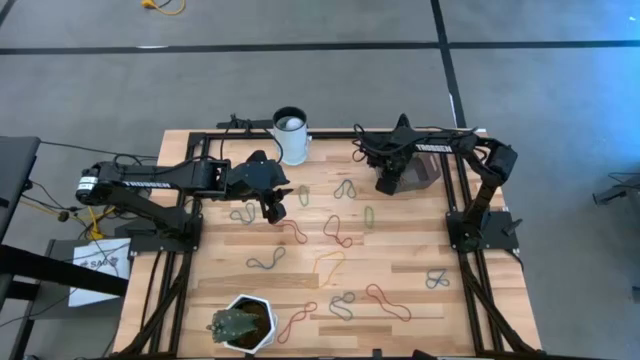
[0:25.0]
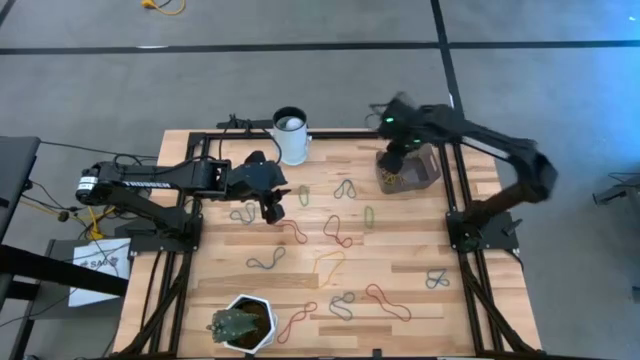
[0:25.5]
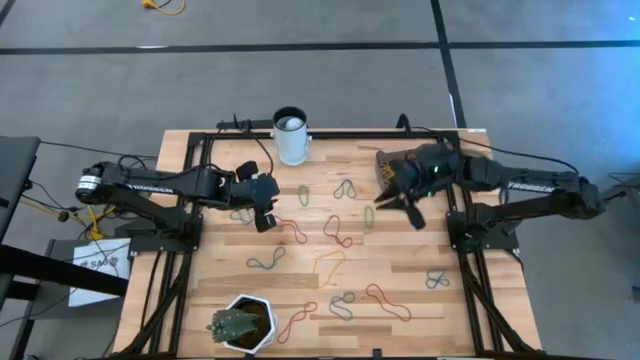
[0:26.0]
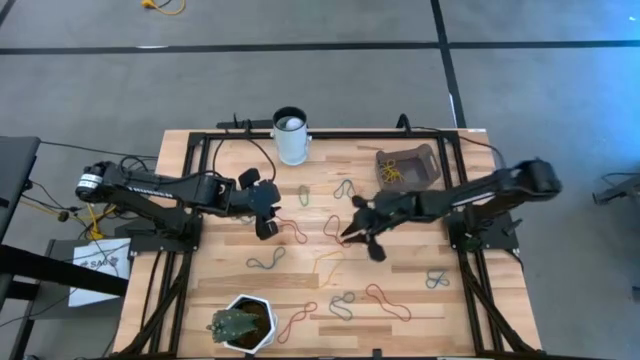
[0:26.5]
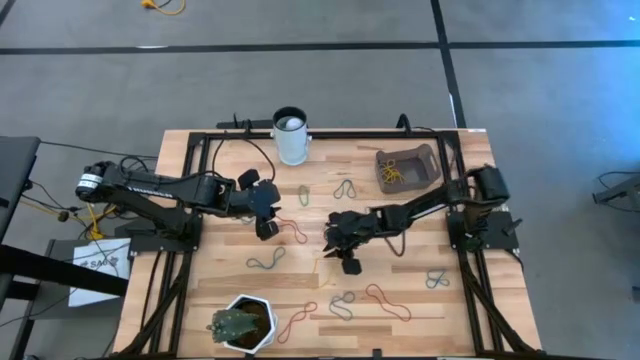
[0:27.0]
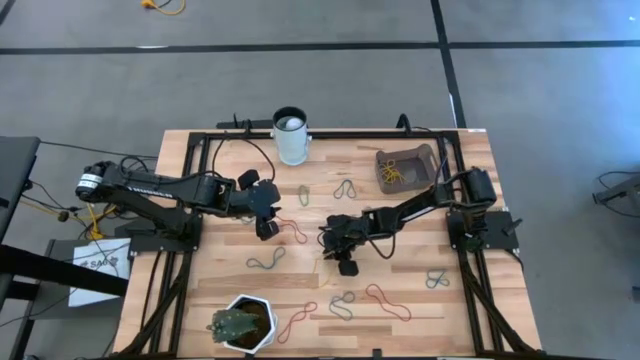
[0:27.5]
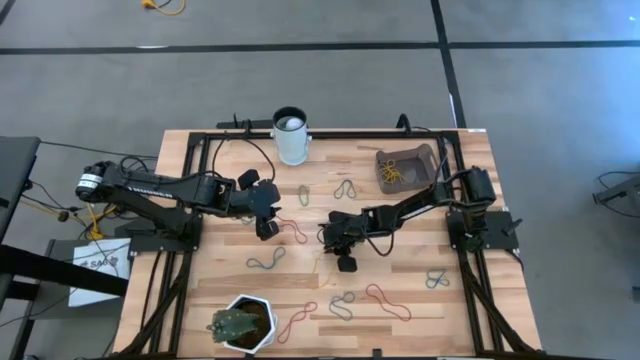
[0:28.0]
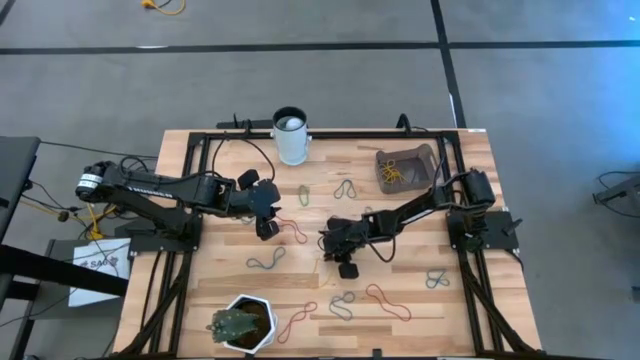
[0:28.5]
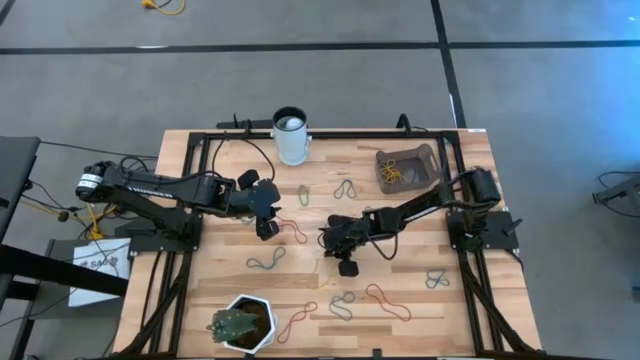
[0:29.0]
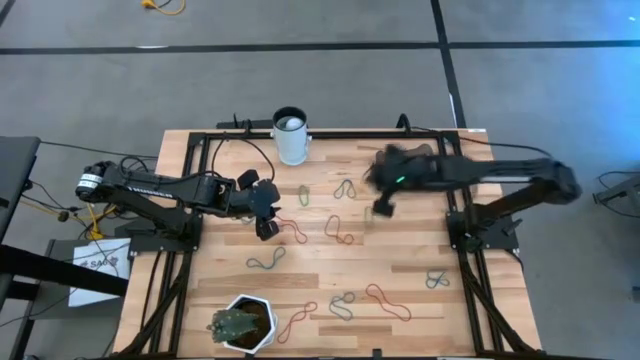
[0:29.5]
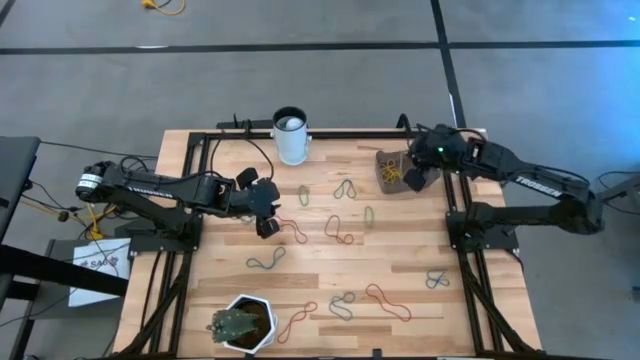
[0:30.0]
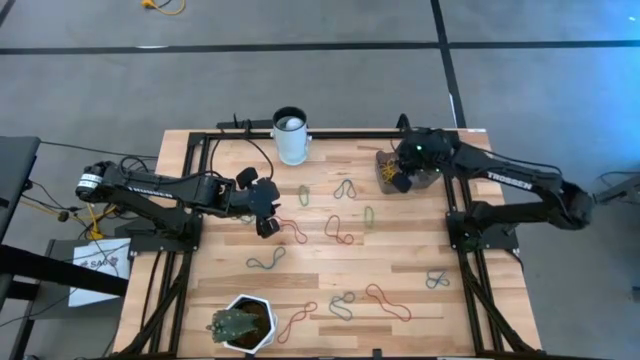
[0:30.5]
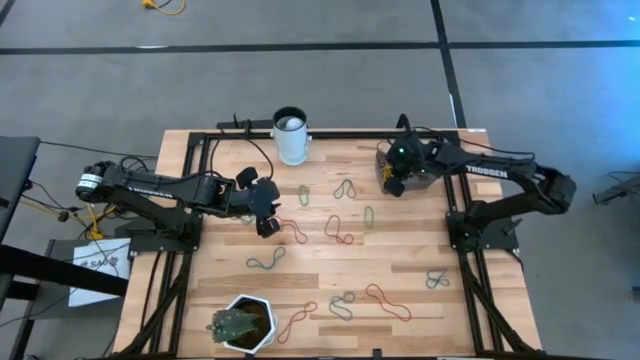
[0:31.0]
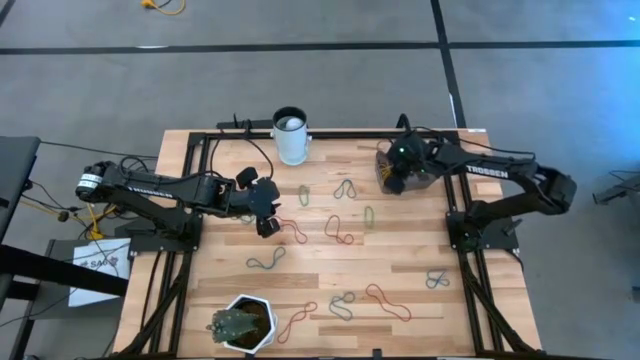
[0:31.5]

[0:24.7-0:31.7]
Task: Pick and place items into bin
Put the yellow rubber band into the bin

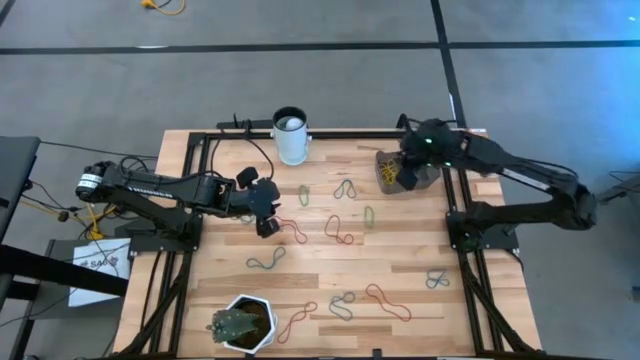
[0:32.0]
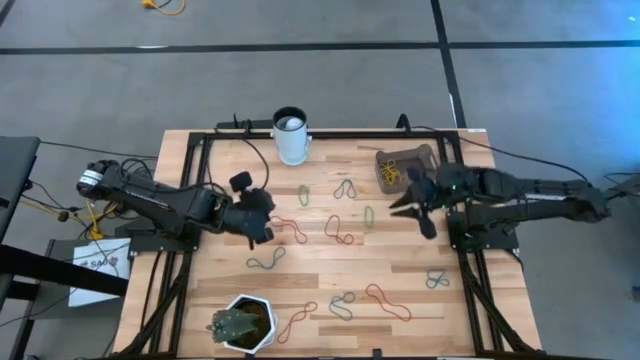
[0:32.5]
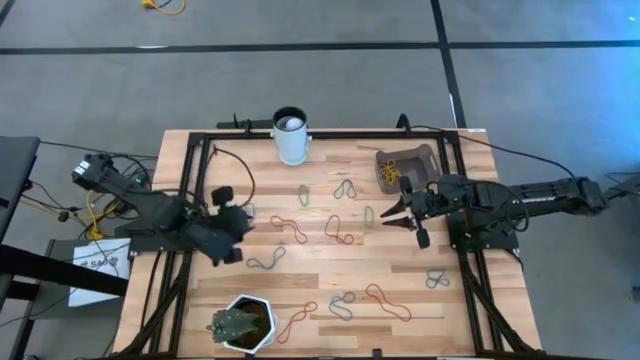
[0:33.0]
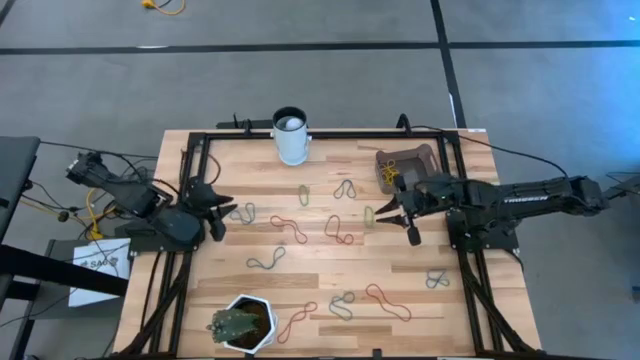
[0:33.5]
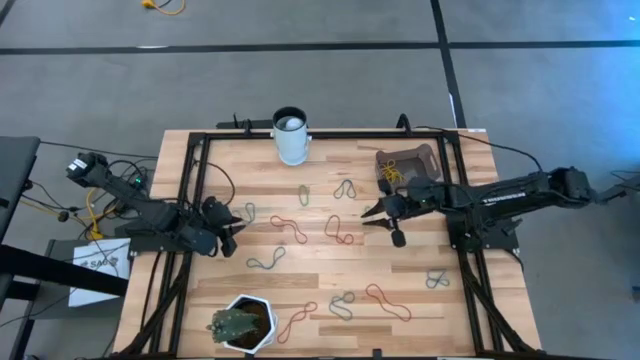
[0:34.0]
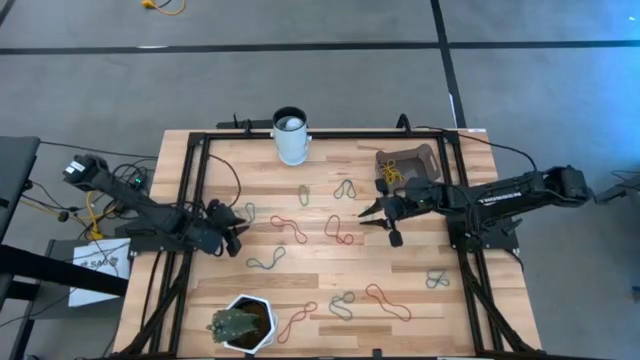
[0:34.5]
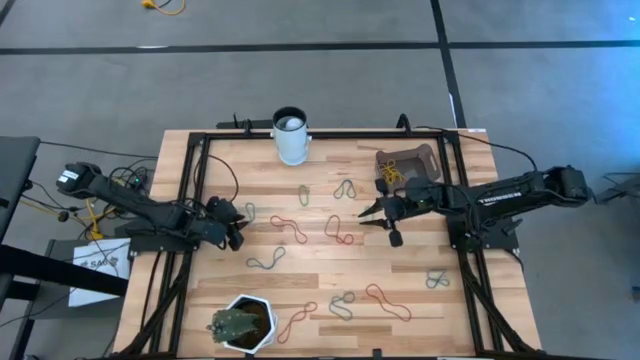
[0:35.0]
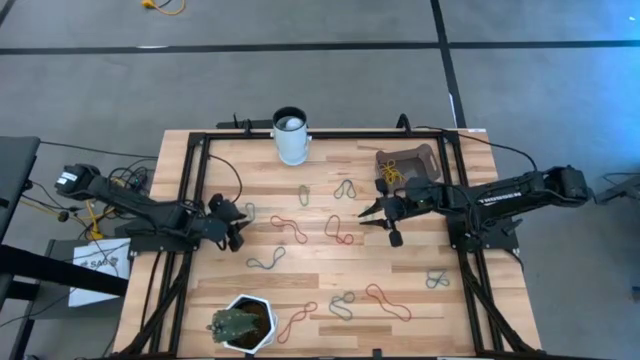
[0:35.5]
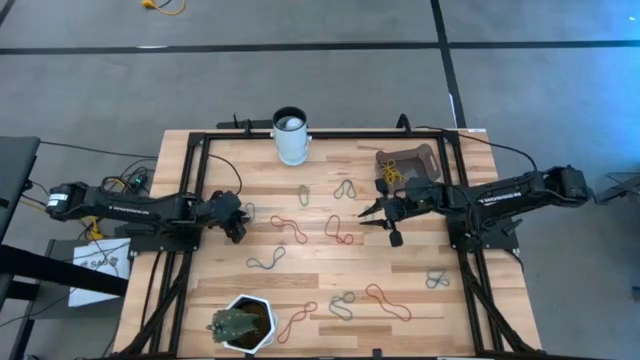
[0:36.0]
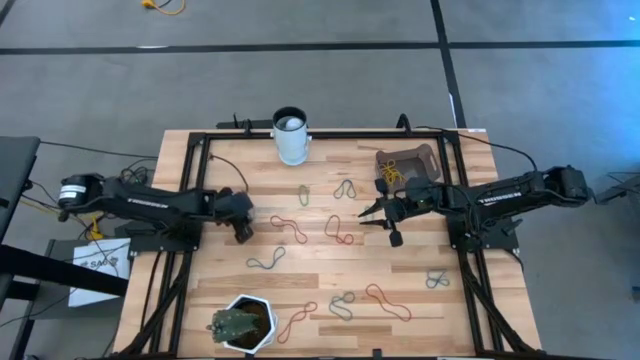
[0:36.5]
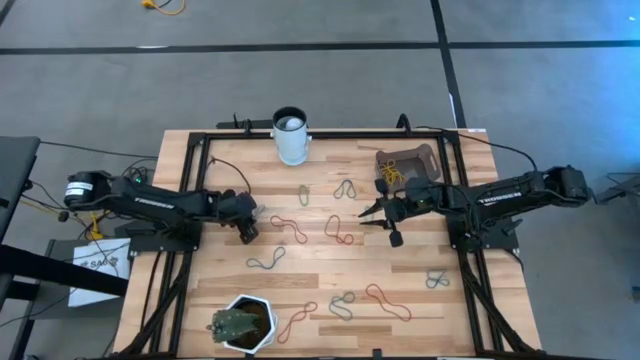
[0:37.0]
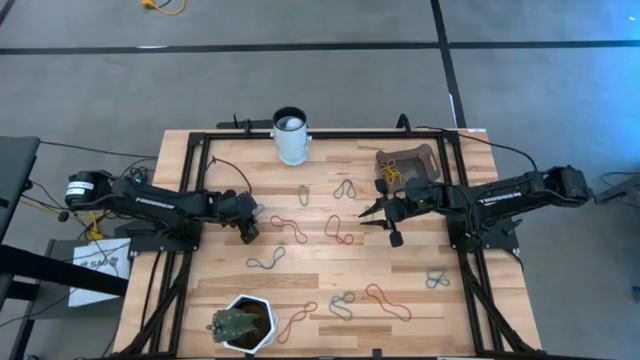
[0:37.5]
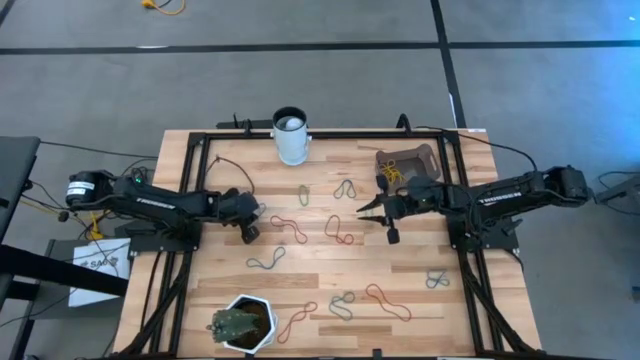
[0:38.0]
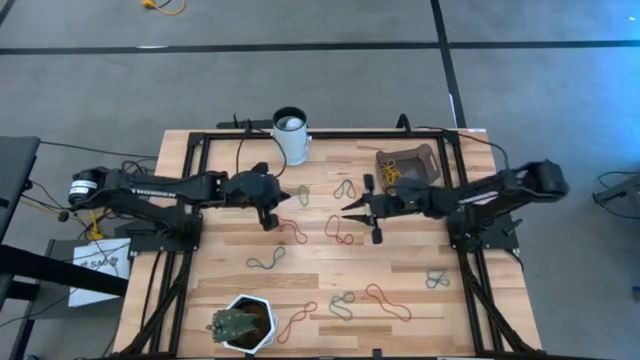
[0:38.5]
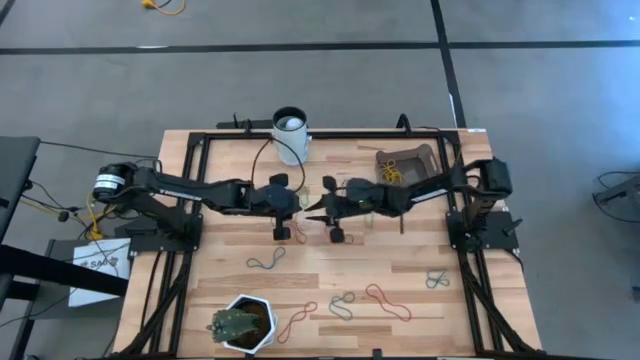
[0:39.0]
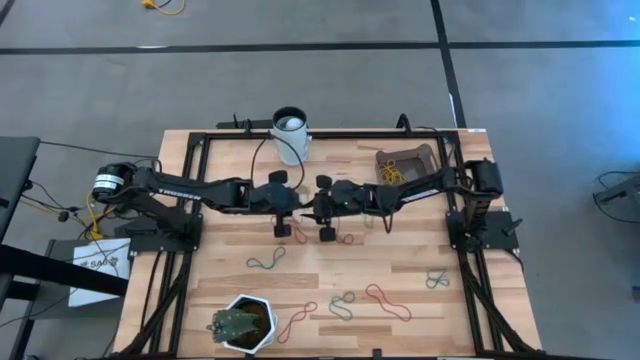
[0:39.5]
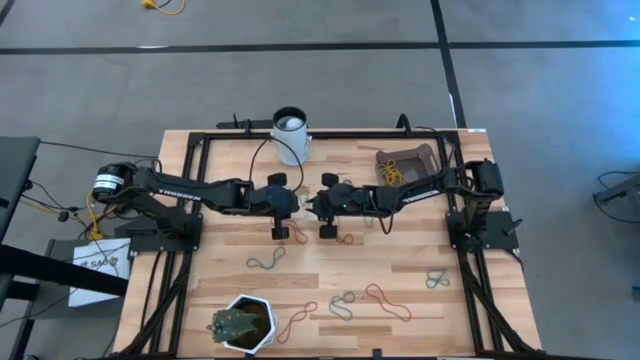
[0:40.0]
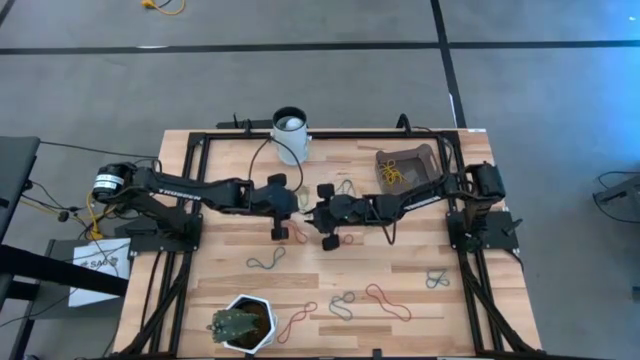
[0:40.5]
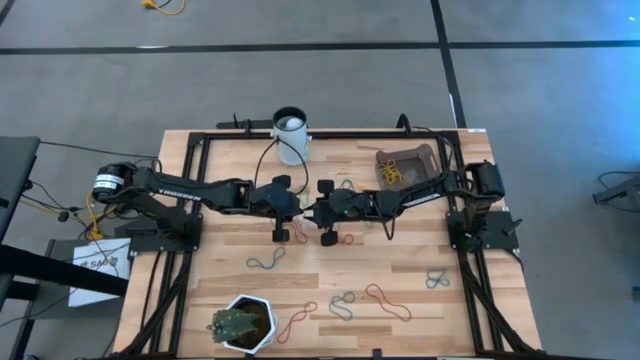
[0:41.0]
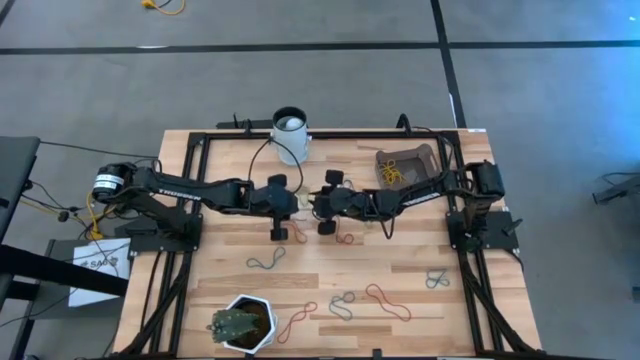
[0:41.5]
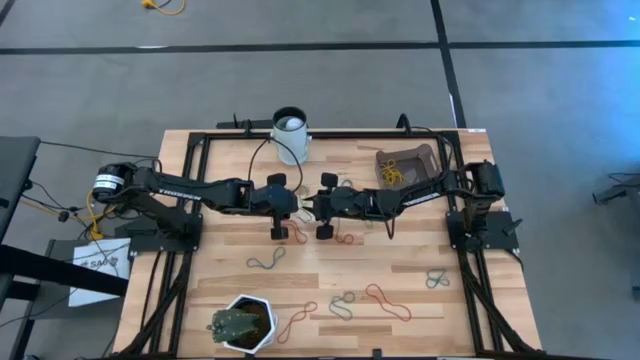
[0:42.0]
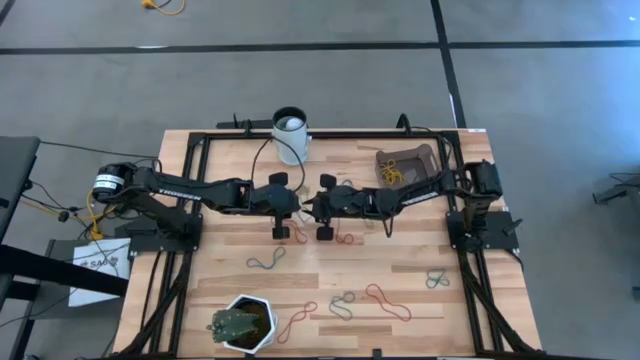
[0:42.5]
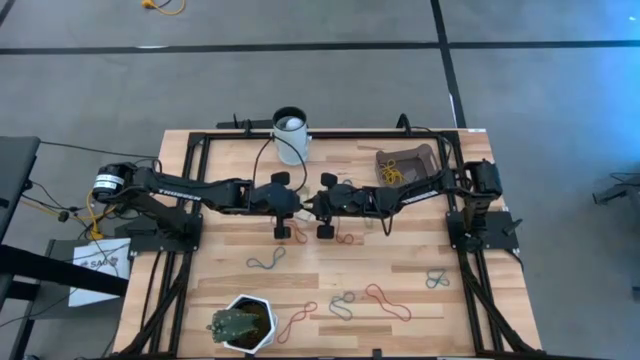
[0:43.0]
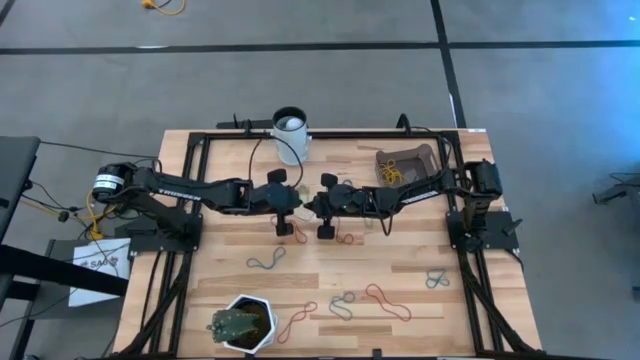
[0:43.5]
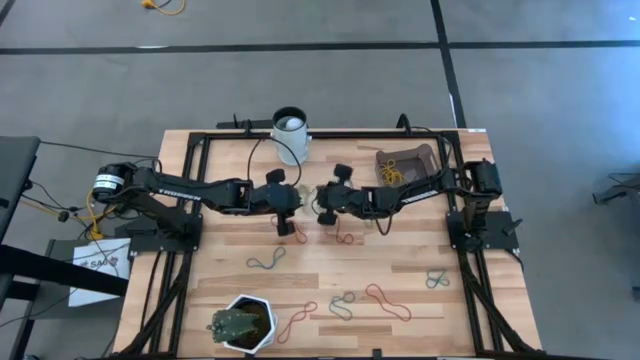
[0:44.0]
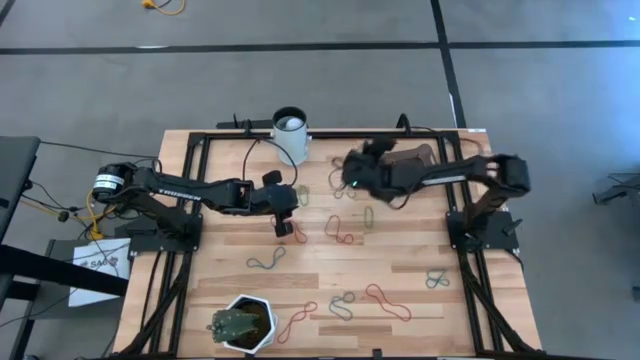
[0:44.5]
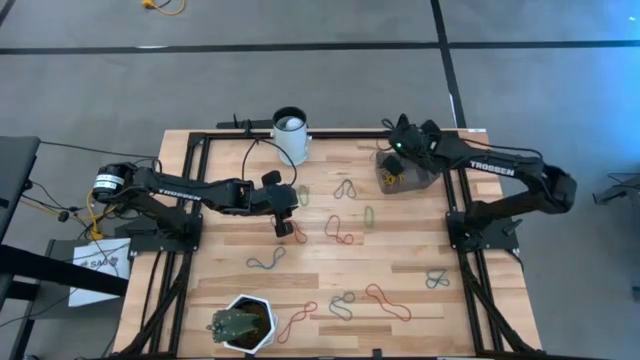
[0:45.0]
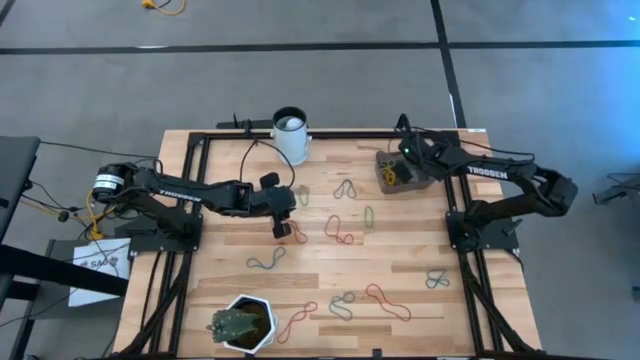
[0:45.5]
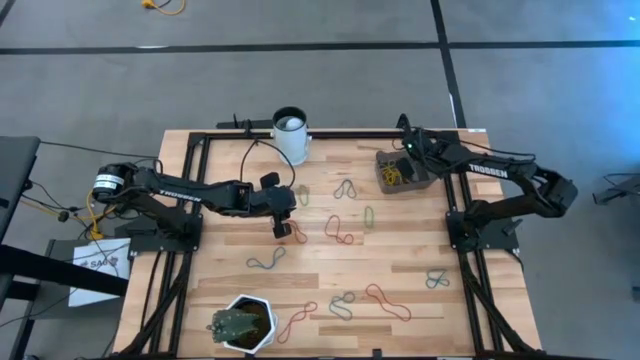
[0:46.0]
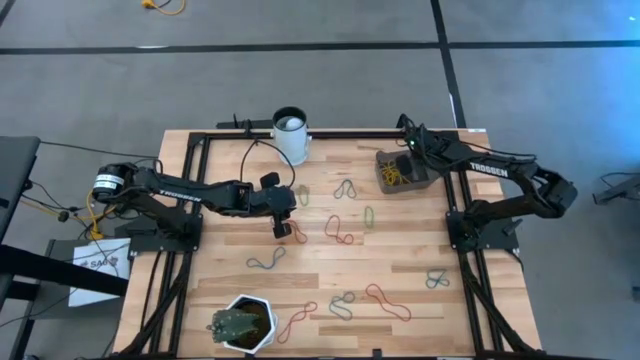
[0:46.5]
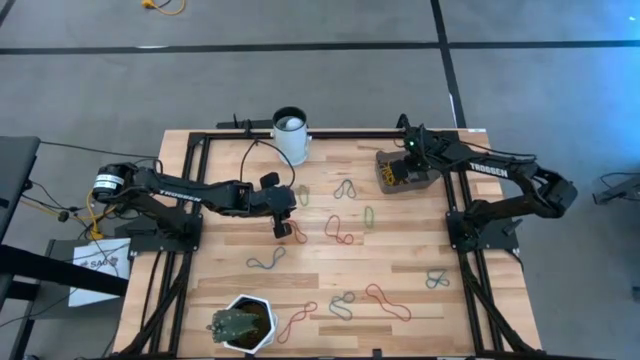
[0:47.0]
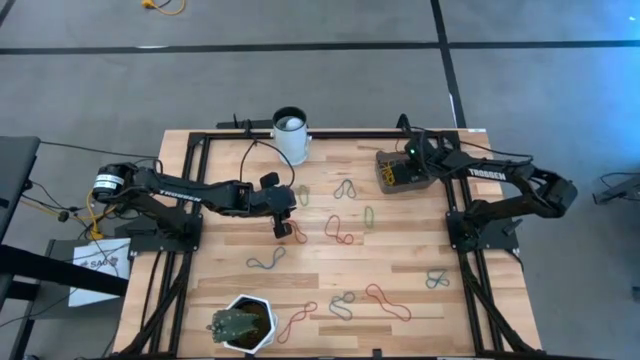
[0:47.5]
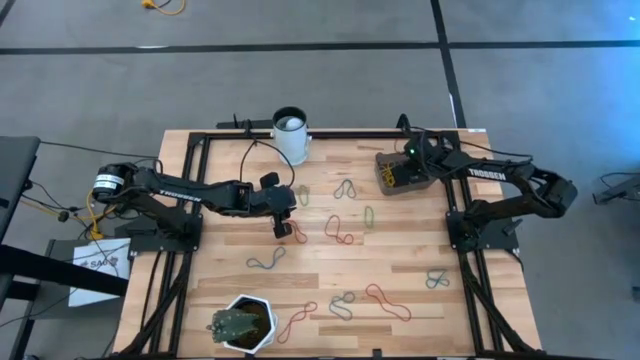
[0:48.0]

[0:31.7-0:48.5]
Put the blue rubber band into the bin
